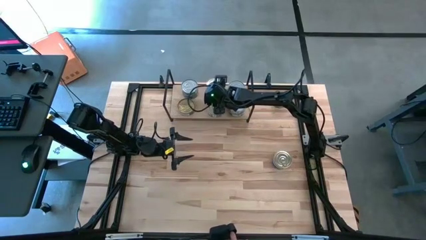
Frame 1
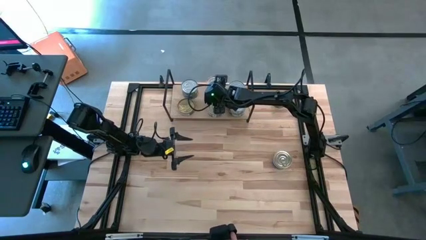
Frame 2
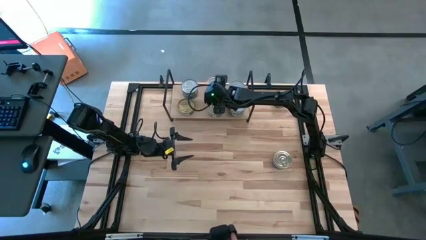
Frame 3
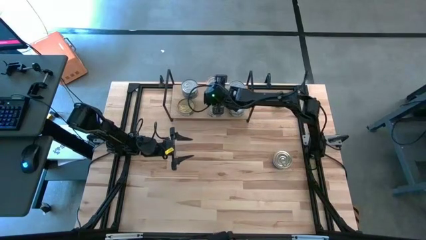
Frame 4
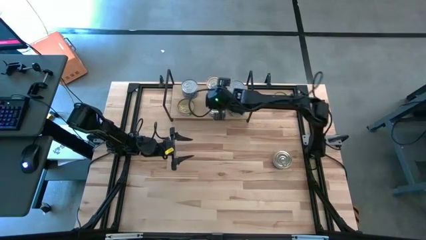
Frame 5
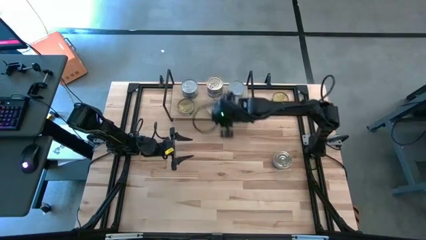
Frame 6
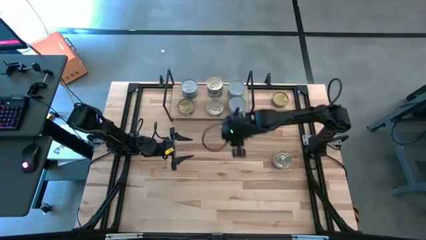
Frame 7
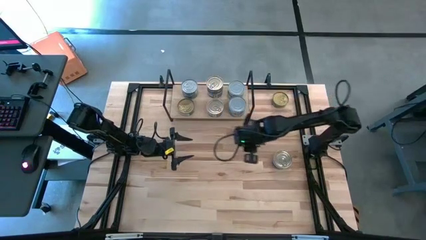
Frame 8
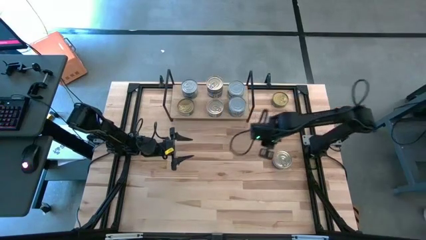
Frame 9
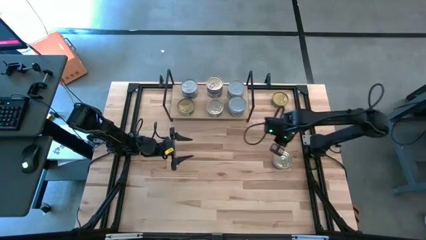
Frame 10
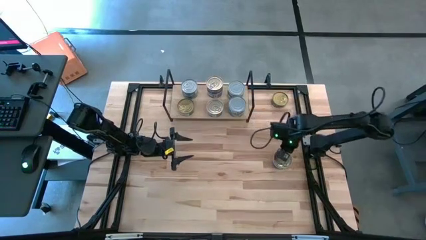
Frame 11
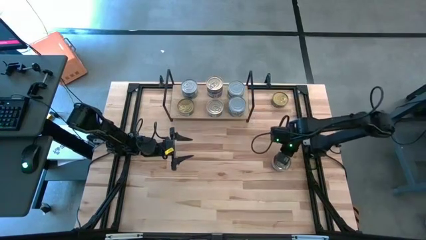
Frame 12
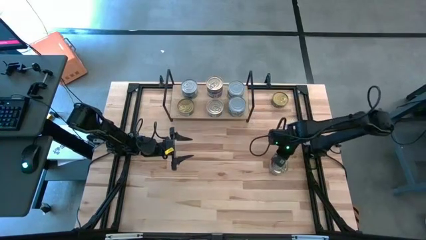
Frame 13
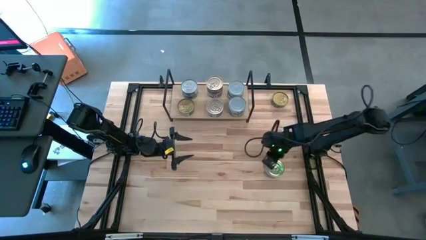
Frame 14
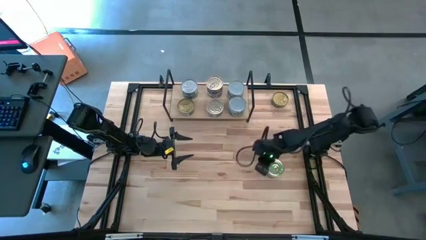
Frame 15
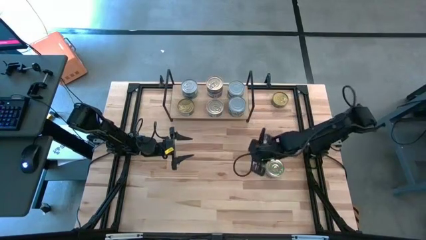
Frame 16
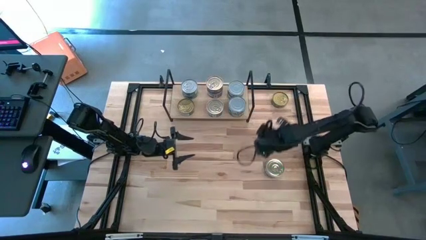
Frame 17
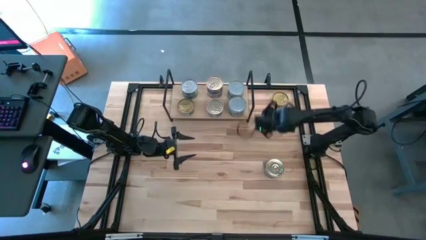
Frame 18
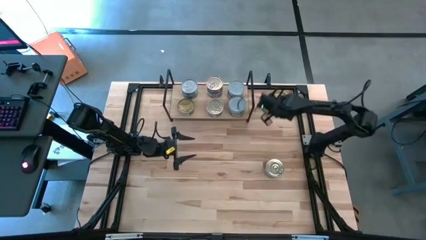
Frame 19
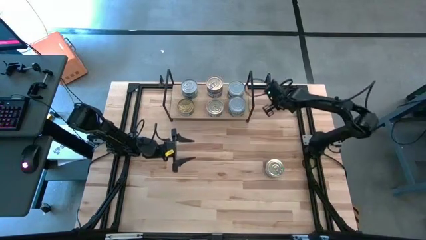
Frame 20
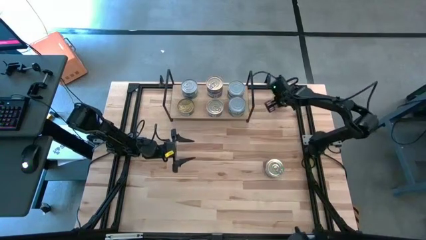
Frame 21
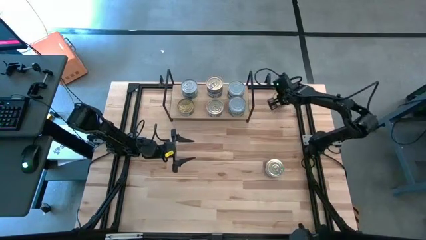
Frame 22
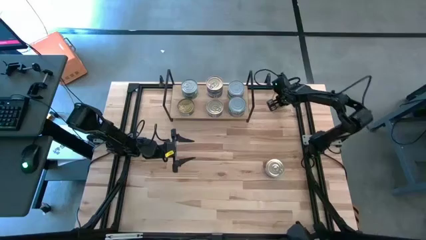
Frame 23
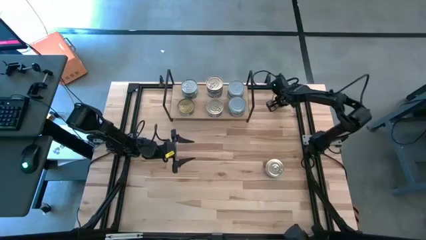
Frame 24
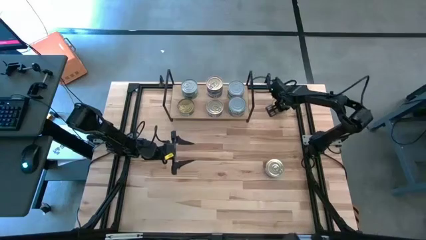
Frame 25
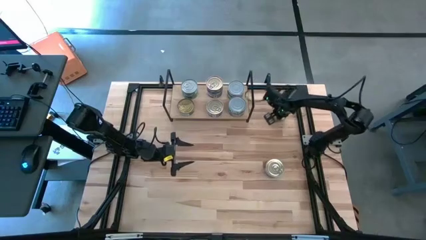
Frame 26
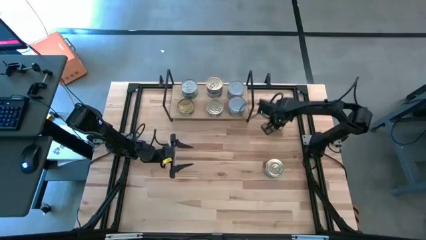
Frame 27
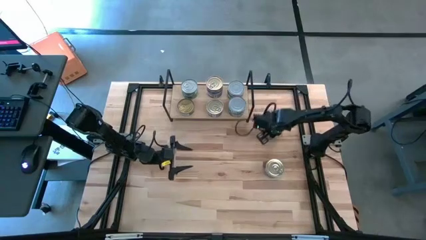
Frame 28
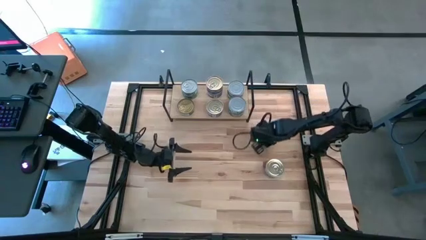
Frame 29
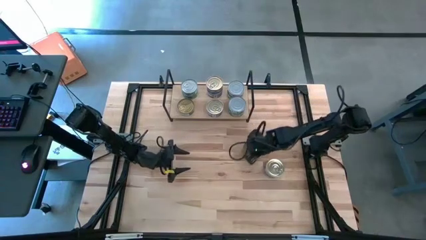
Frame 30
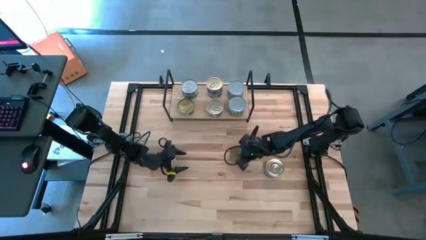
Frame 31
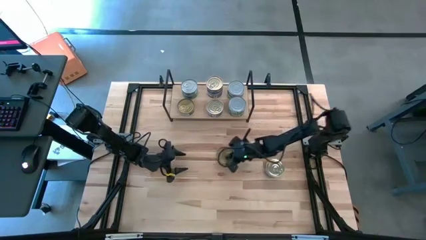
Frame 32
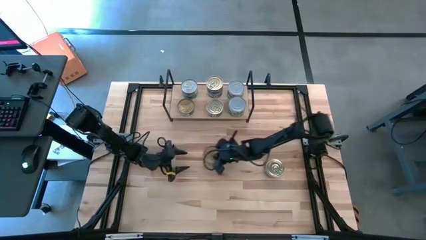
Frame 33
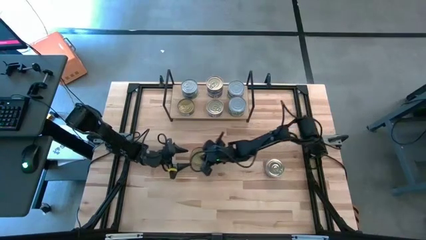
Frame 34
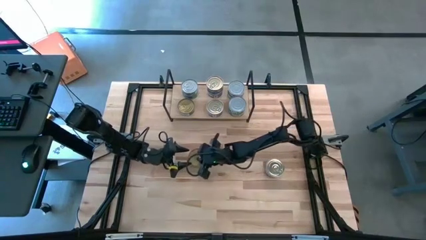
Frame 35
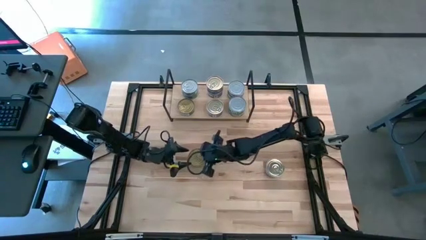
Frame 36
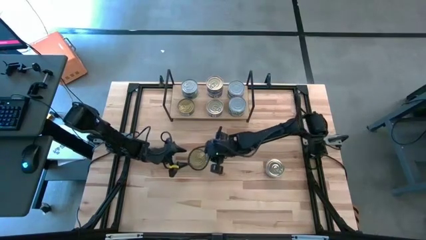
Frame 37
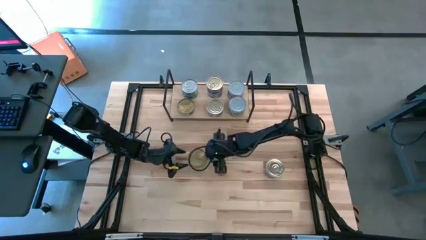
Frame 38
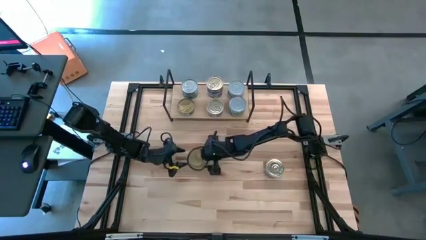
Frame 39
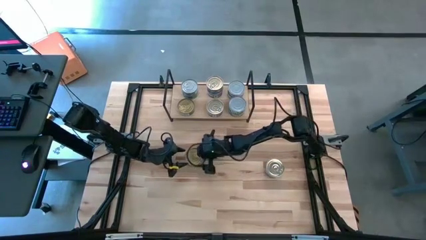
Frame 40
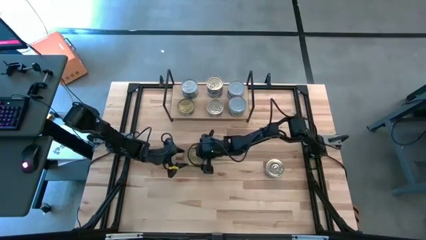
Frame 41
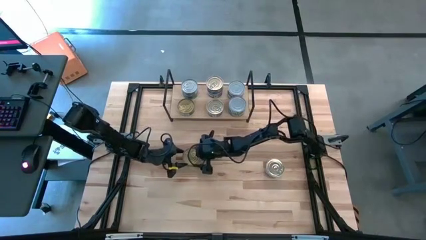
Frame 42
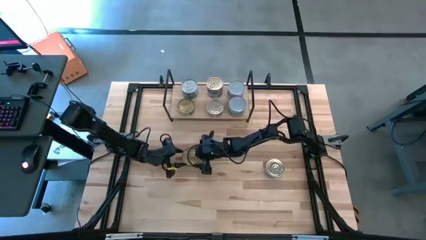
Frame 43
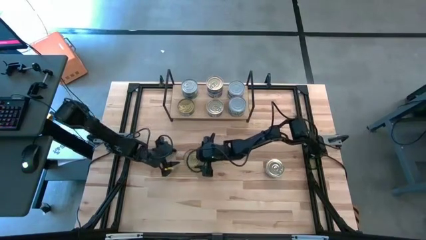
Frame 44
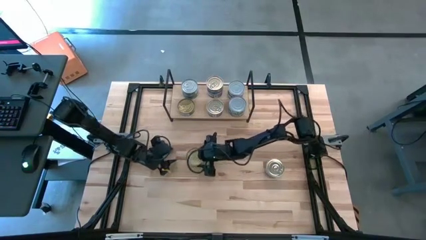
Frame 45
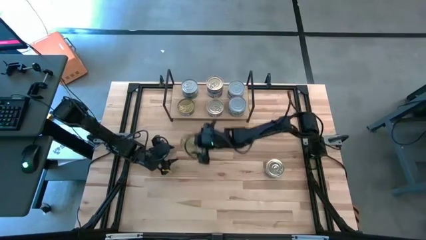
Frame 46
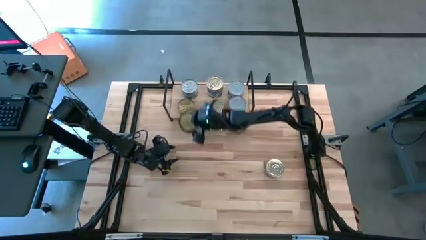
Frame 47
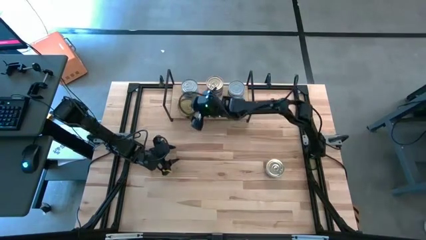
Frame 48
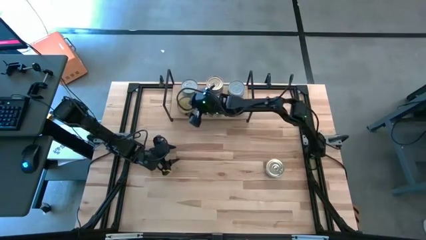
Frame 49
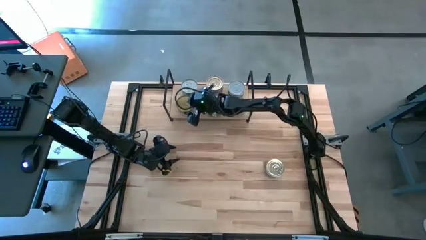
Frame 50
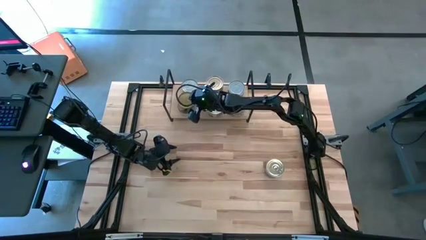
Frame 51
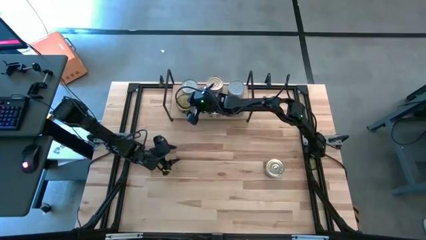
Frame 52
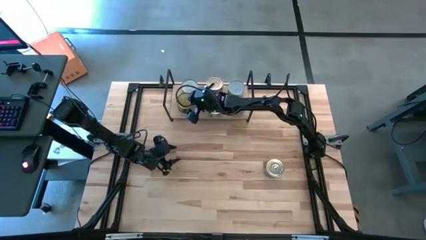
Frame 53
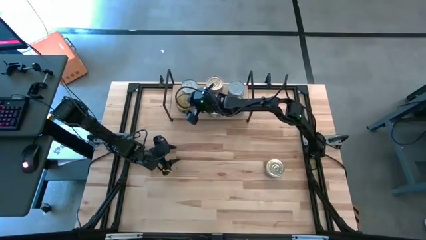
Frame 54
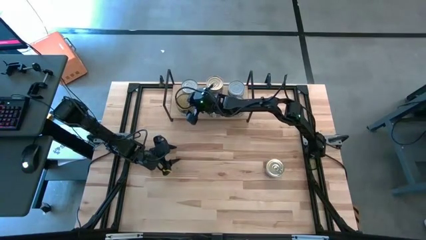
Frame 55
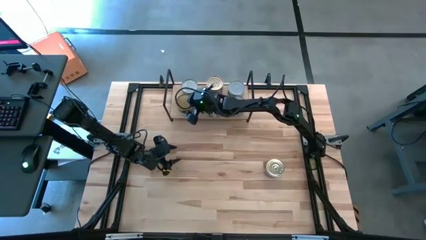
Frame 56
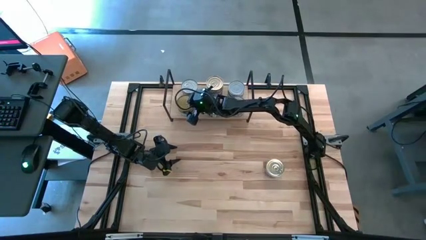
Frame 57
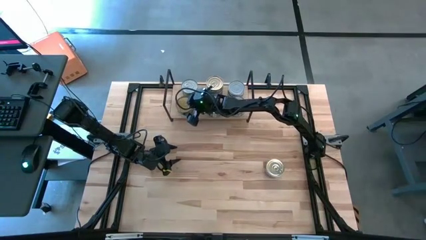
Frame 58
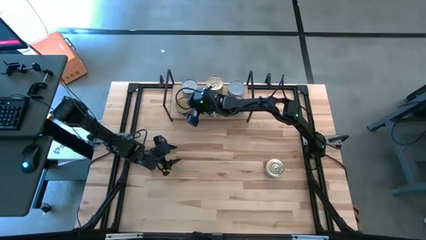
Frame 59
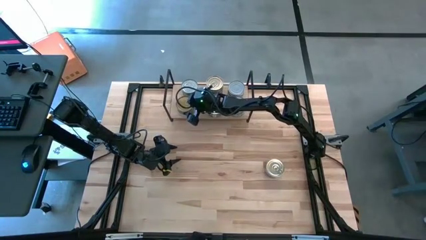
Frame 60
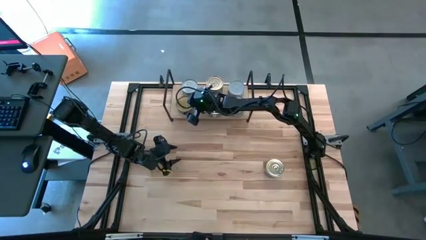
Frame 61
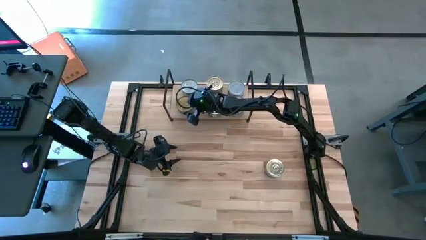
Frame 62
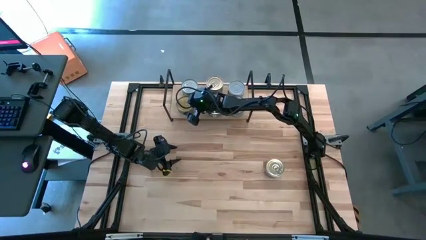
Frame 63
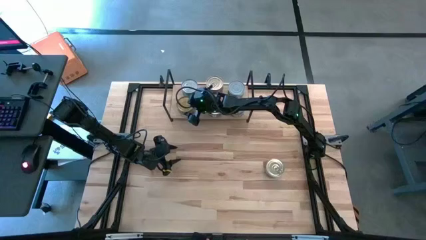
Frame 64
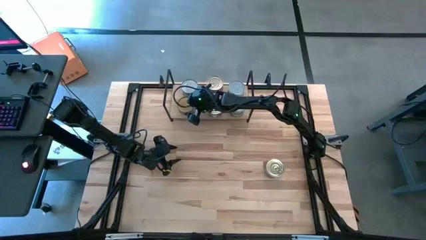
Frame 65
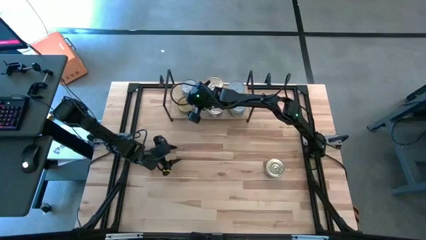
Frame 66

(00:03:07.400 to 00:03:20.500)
Task: Stack canned seafood by type on shelf
Stack the green tuna can on top of the green tuna can on the shelf

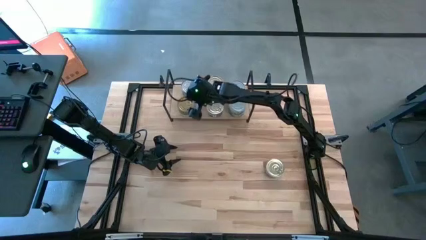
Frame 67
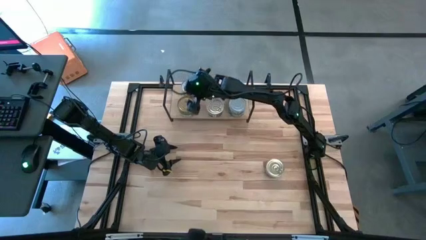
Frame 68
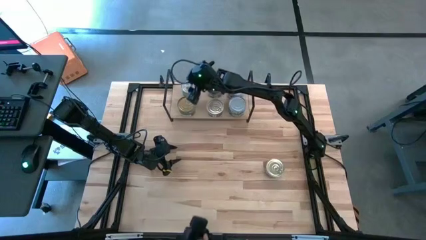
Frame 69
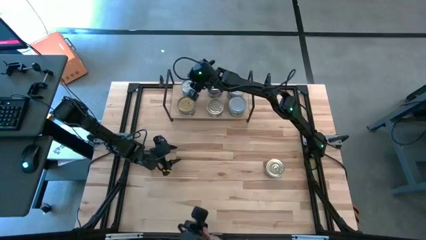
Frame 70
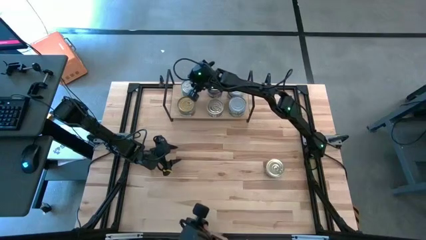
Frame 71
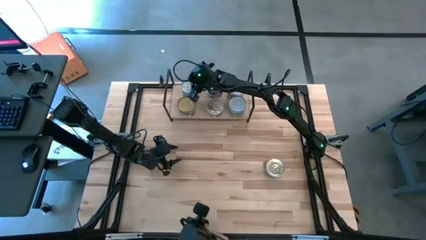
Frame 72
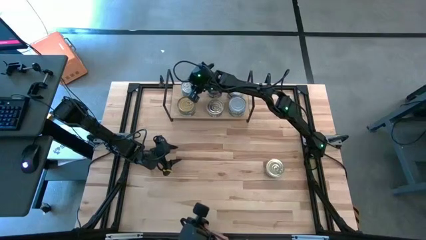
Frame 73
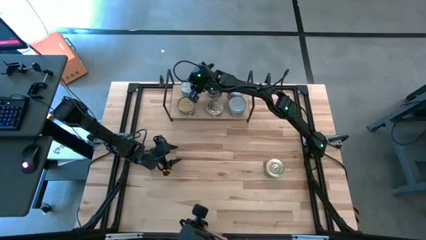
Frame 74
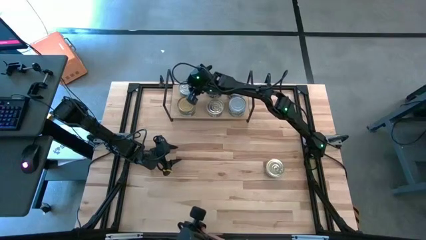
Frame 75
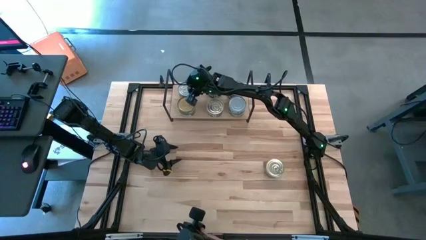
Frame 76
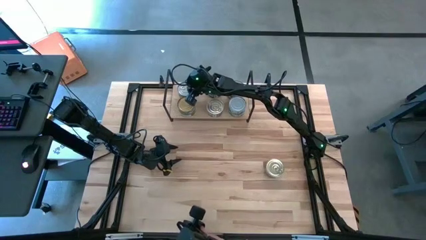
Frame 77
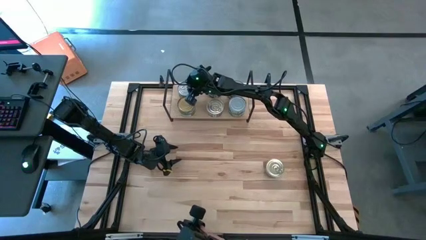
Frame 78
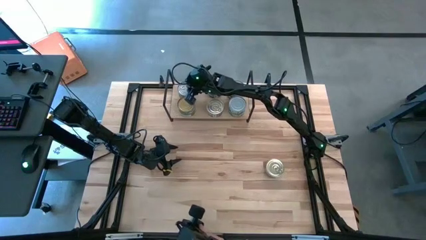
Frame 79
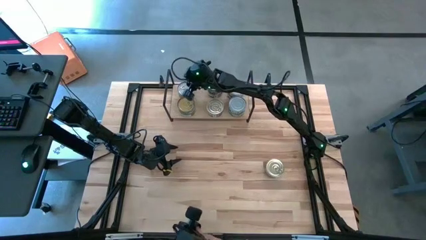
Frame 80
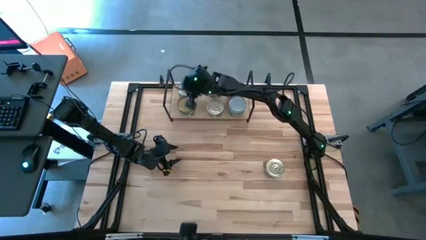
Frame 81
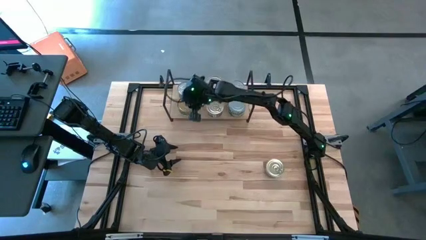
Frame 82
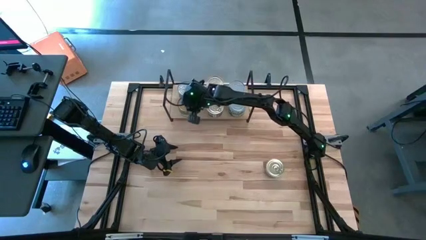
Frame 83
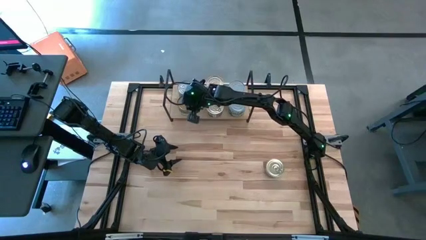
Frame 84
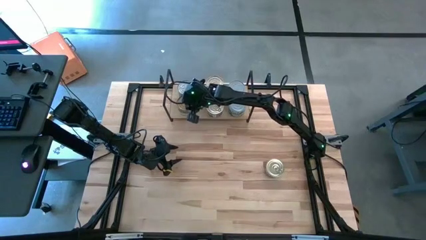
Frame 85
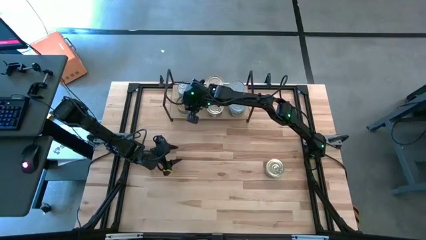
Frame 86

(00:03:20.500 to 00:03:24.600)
Adjust the tuna cans on the shelf
